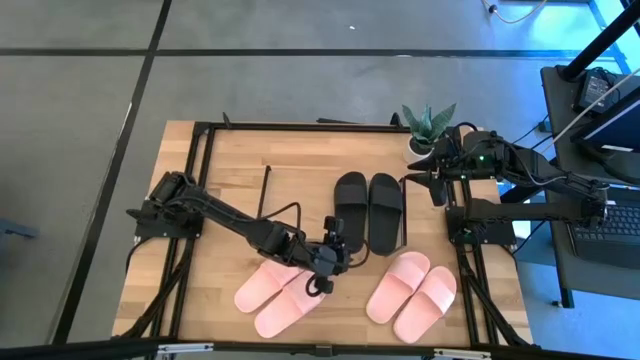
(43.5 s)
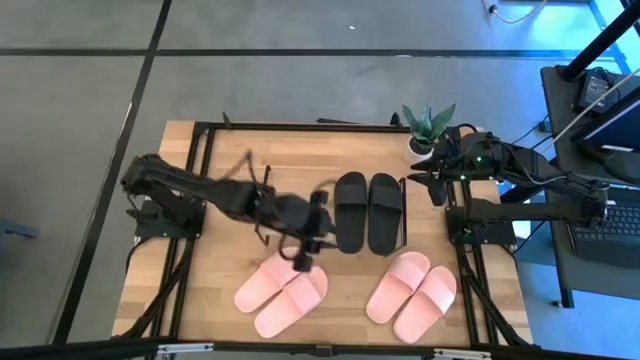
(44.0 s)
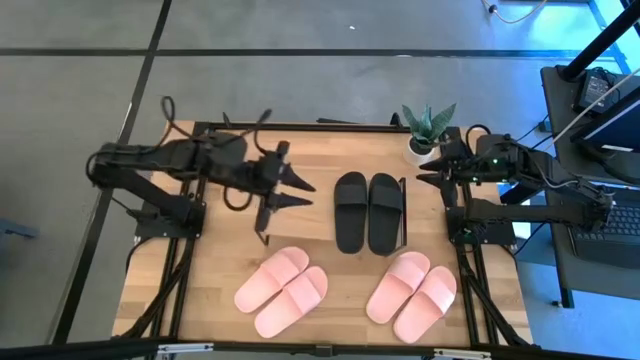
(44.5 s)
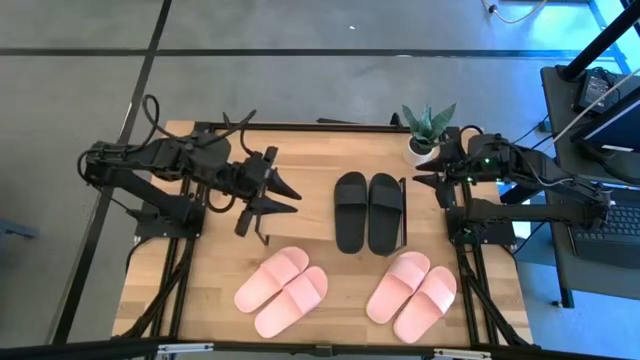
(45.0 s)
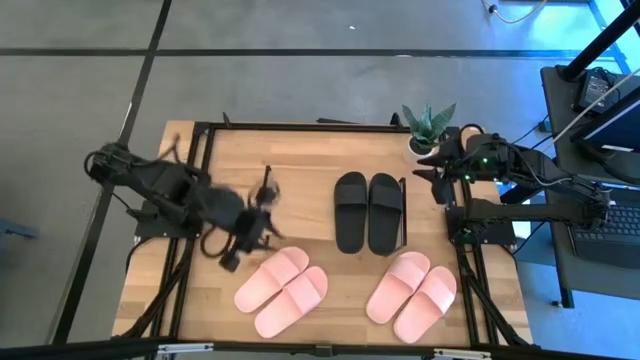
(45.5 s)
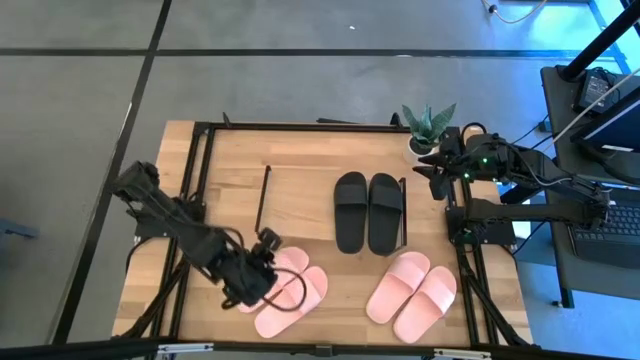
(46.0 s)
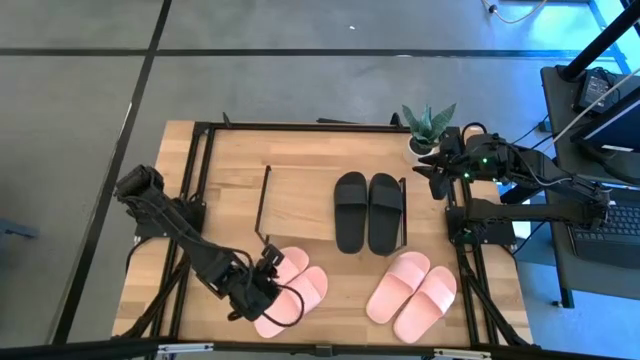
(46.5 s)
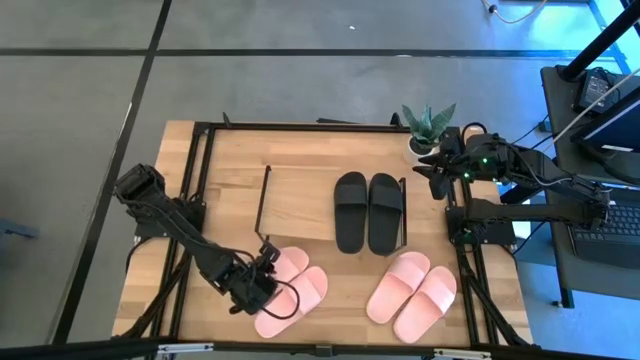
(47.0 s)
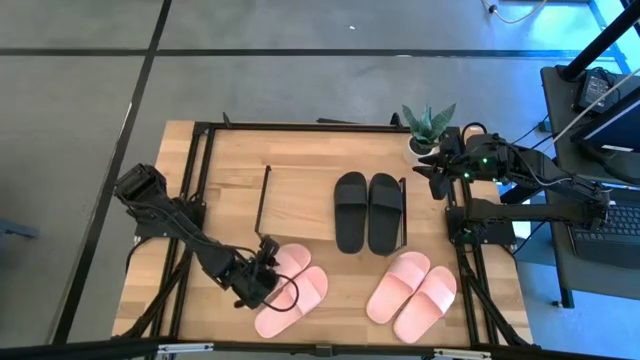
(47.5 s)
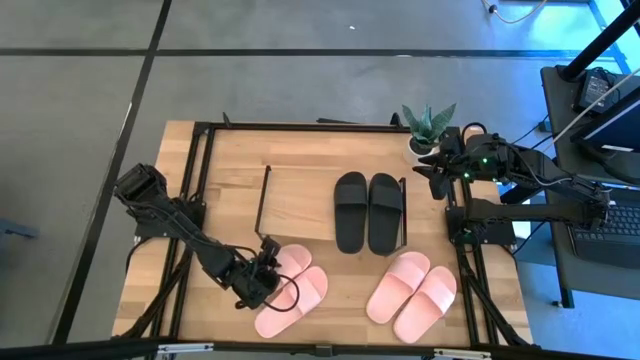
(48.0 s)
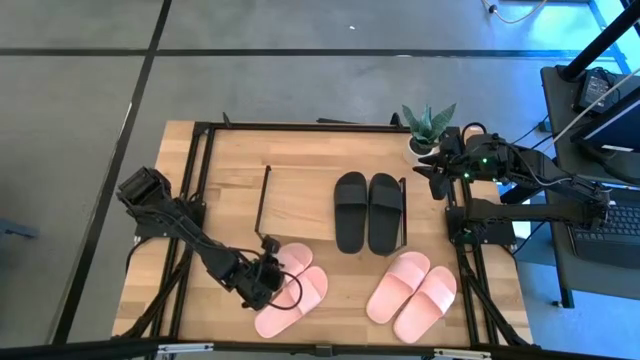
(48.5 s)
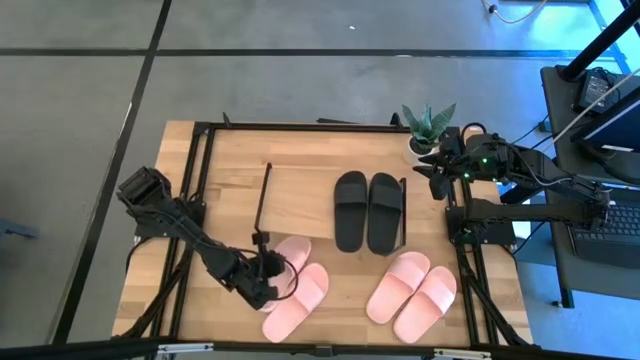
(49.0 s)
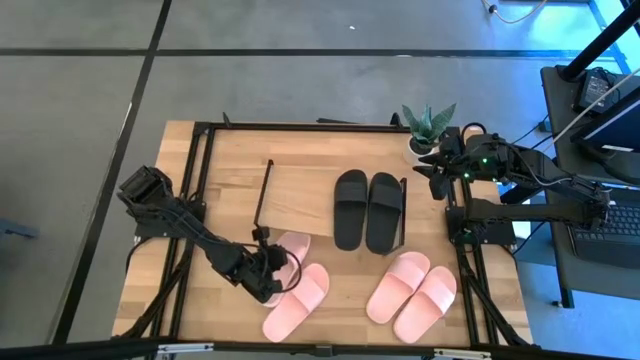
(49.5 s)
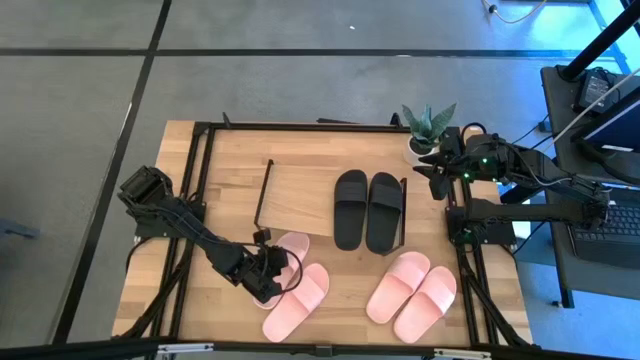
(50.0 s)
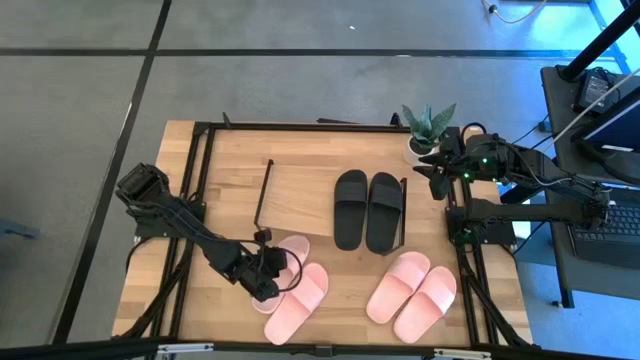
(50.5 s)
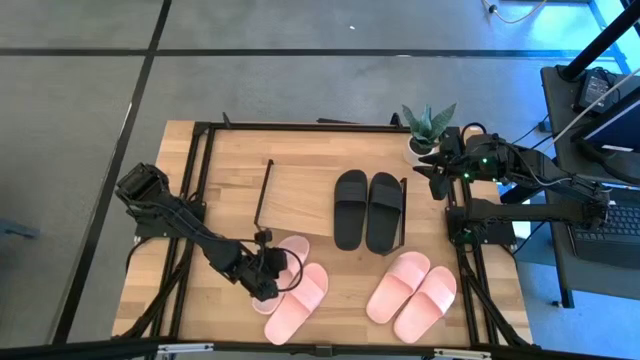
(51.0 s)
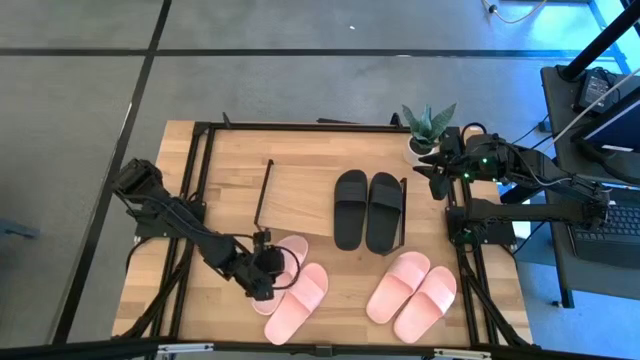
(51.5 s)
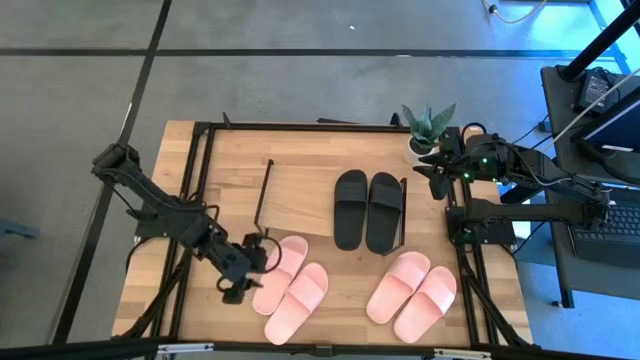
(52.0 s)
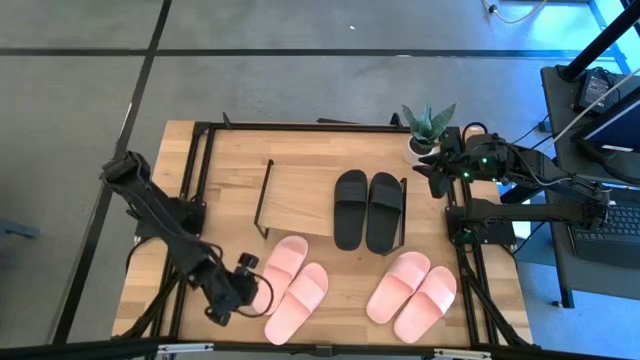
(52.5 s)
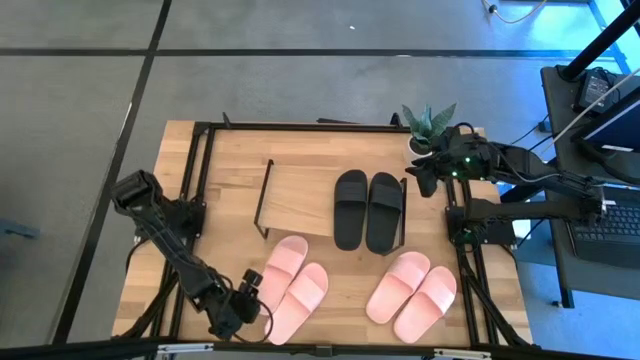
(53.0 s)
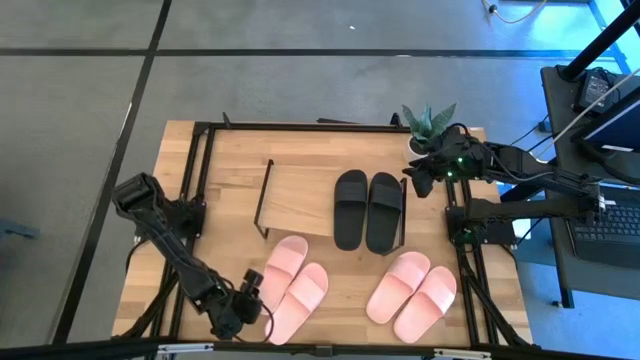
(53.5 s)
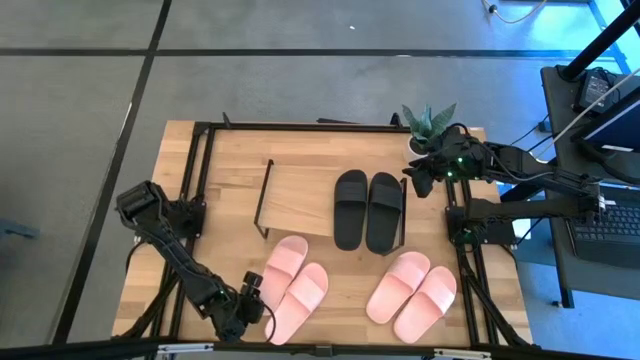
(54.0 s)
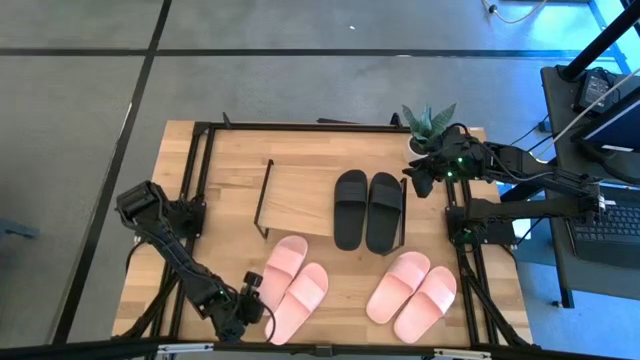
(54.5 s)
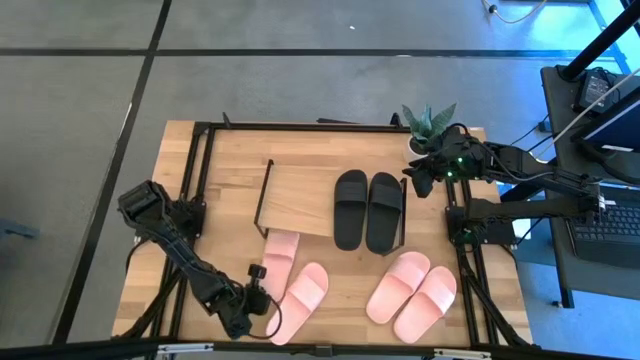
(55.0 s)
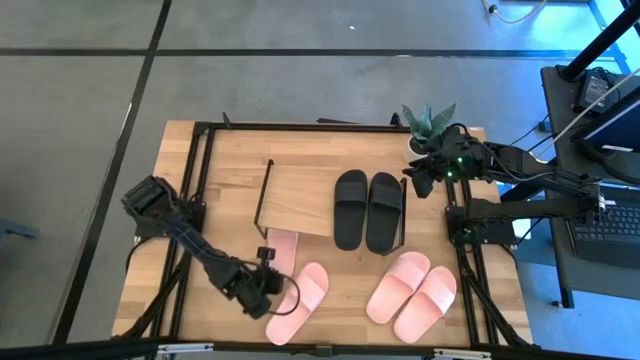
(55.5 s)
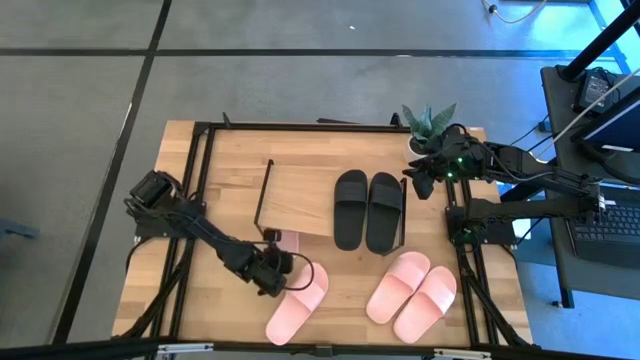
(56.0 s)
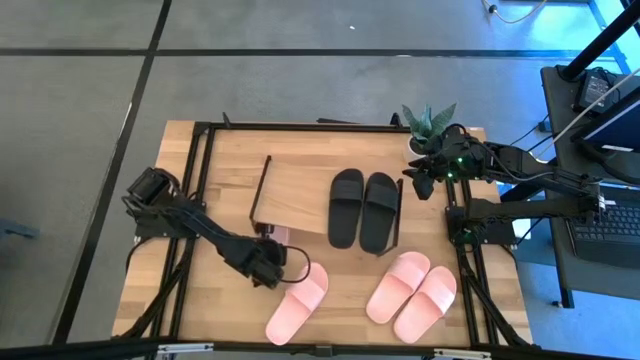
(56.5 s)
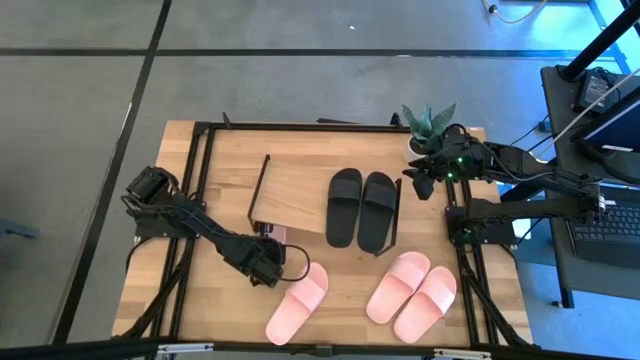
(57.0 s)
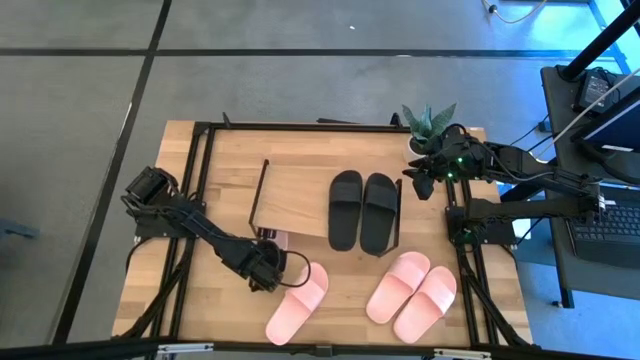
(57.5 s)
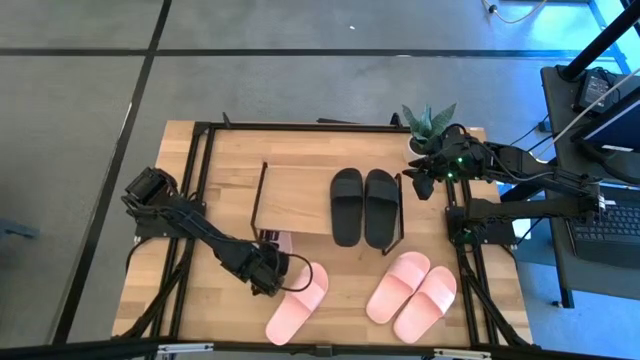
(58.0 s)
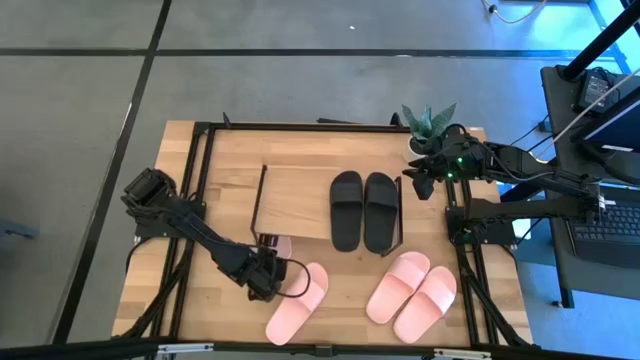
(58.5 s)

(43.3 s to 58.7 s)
Task: Pick and place slides into the shelf
Put the left pink slides under the shelf

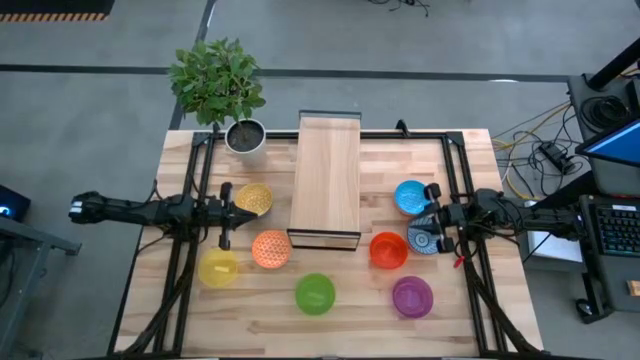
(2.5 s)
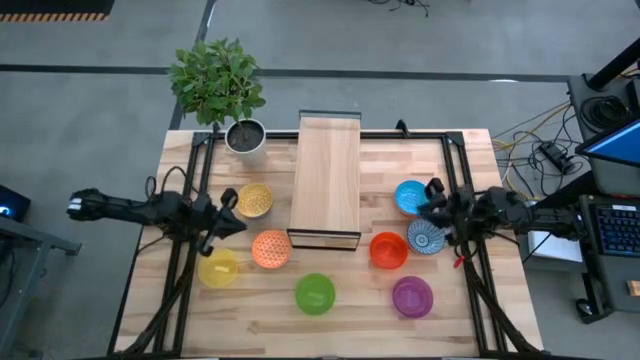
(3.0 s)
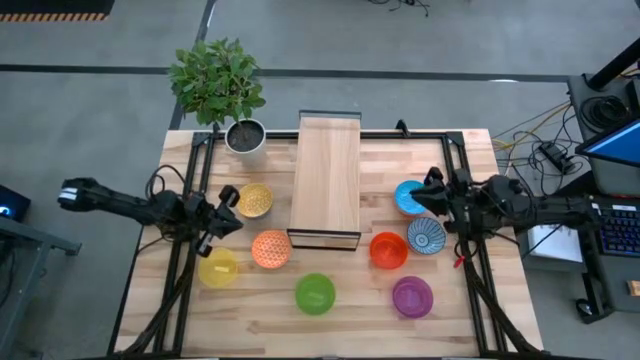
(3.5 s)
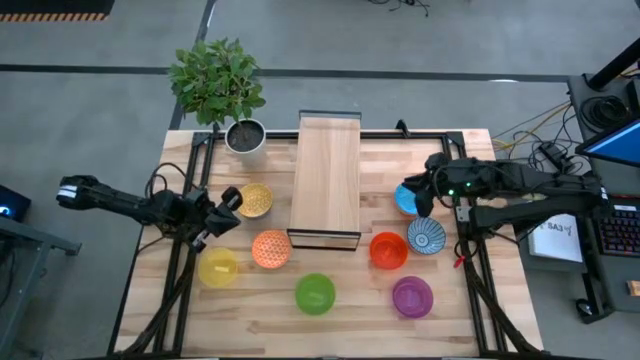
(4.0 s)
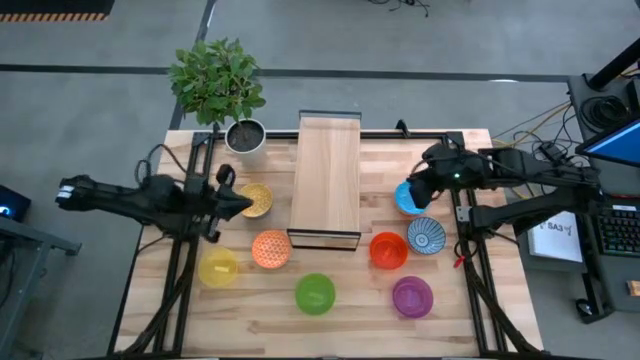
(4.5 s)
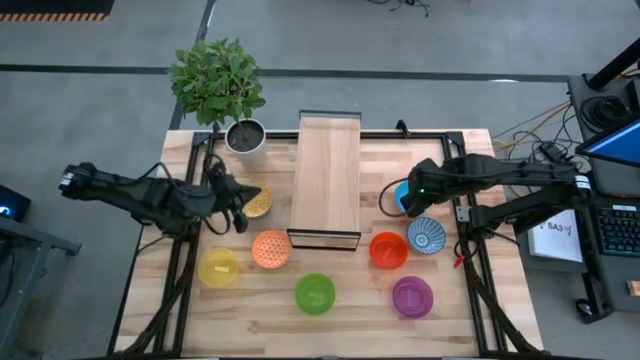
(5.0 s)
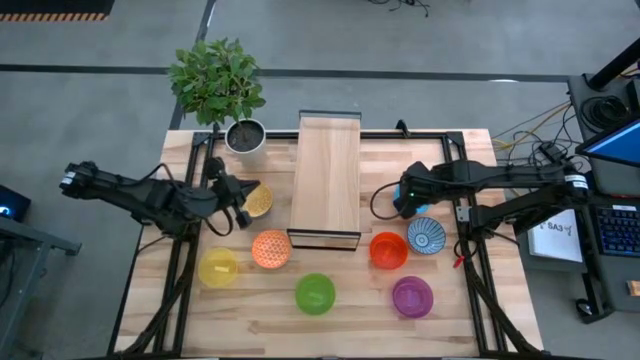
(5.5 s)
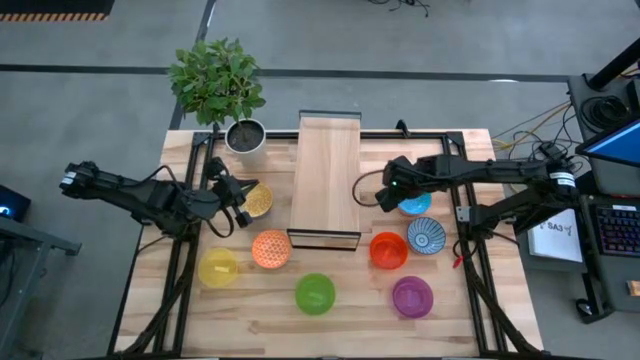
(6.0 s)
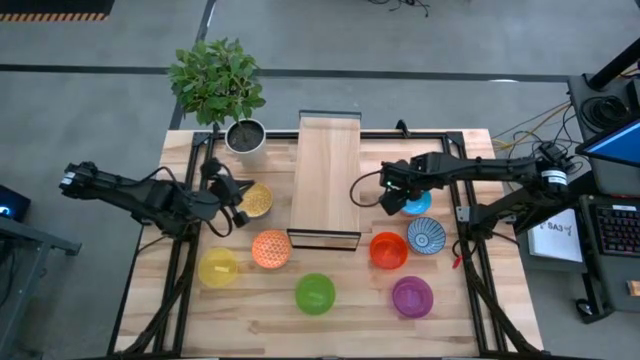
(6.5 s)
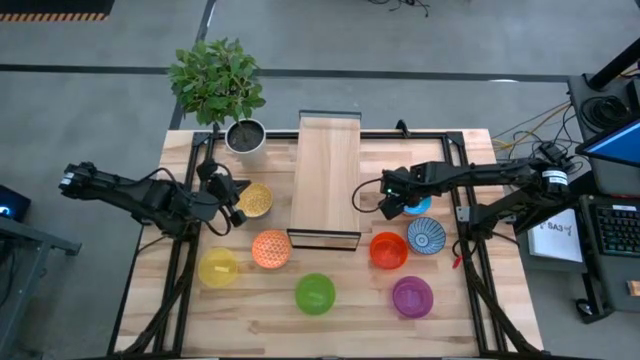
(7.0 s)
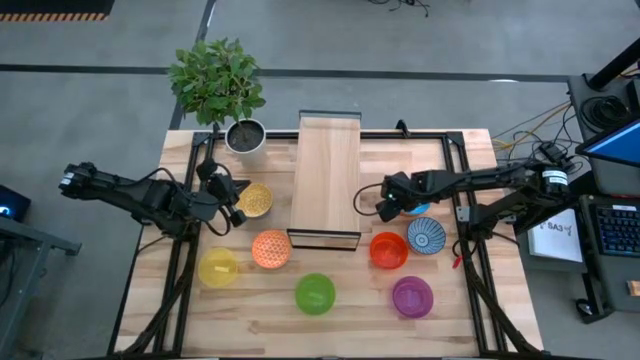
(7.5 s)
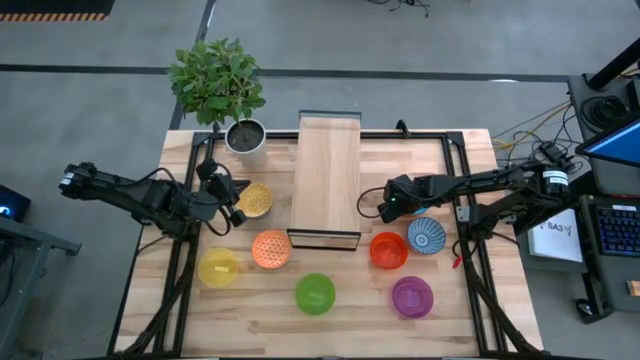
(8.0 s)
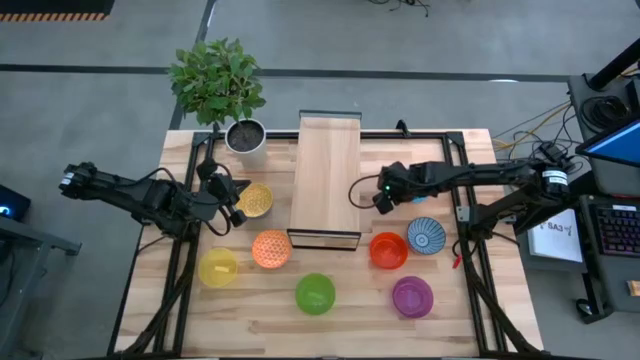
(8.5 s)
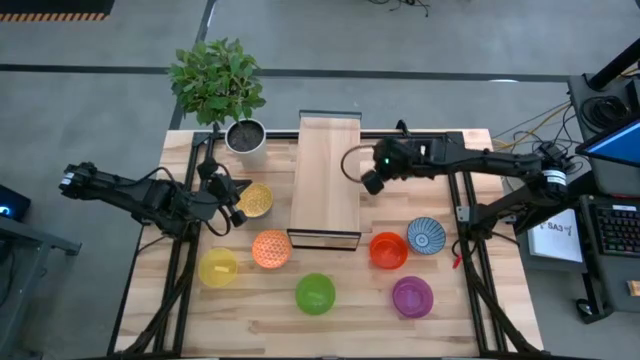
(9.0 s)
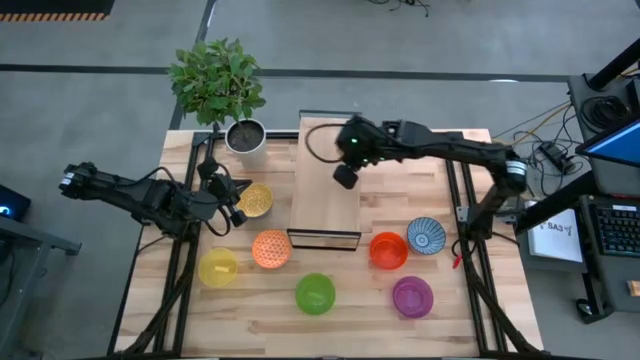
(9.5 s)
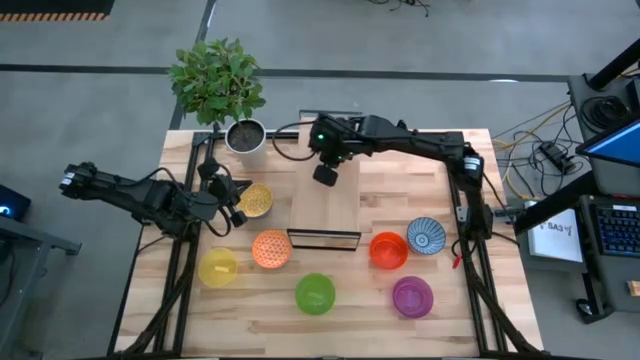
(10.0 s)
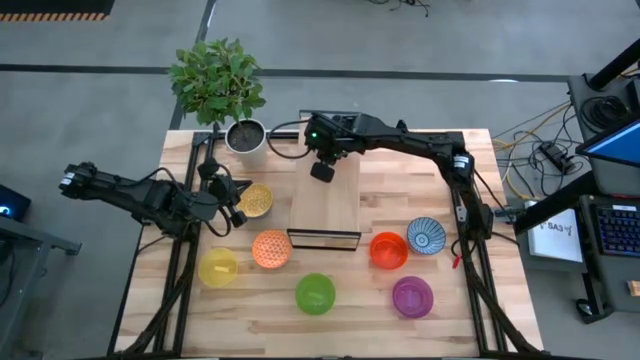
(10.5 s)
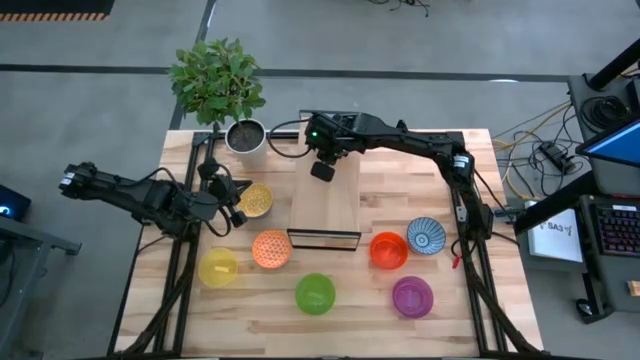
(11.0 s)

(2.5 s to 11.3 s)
Task: Place and stack bowls onto a shelf
Put the light blue patterned bowl on the shelf
